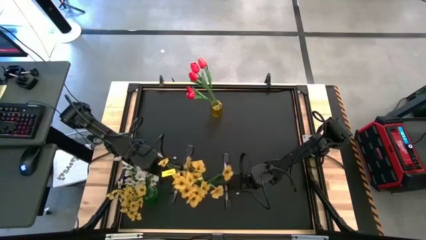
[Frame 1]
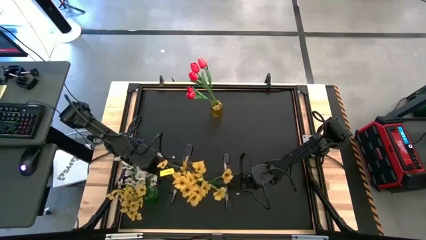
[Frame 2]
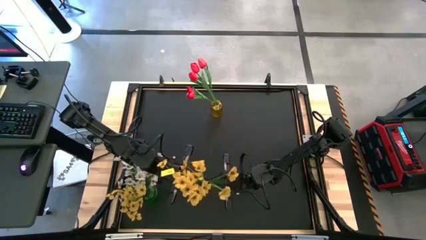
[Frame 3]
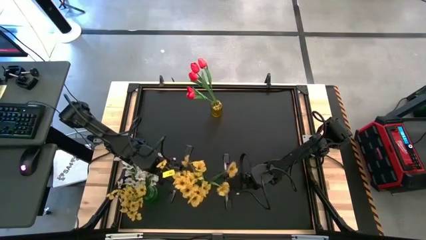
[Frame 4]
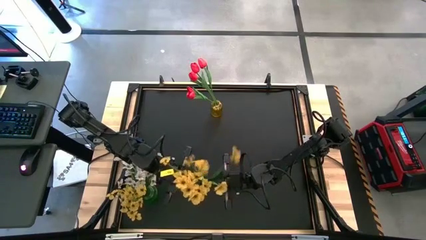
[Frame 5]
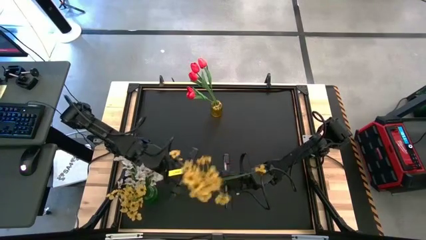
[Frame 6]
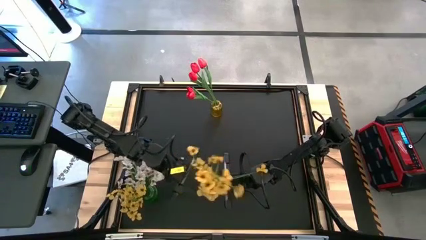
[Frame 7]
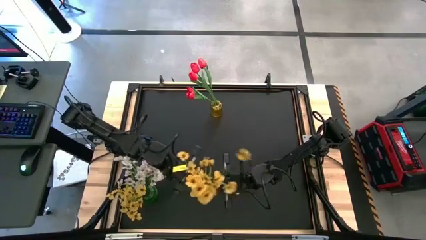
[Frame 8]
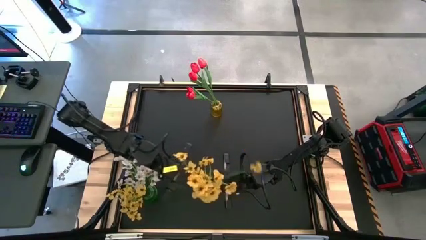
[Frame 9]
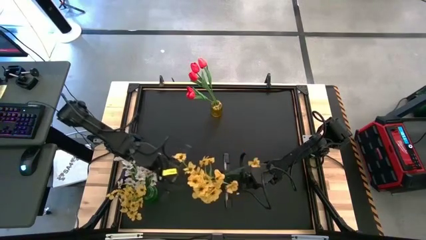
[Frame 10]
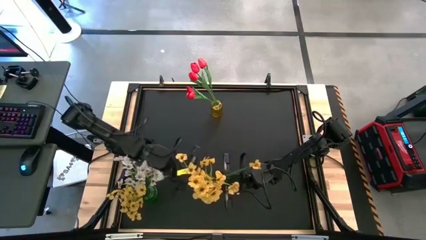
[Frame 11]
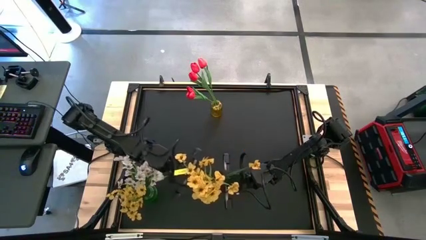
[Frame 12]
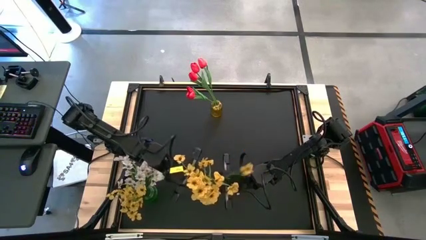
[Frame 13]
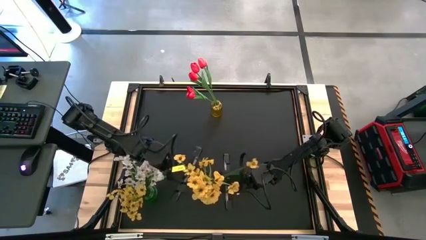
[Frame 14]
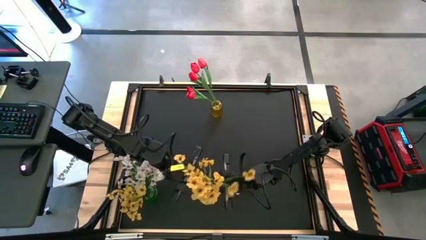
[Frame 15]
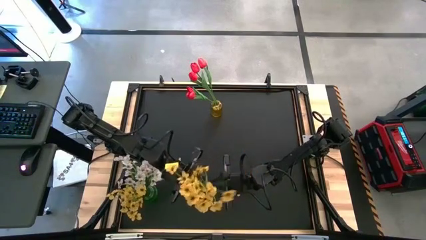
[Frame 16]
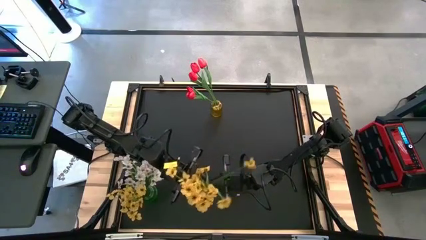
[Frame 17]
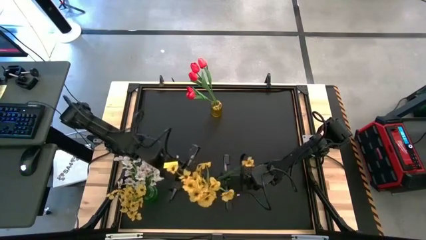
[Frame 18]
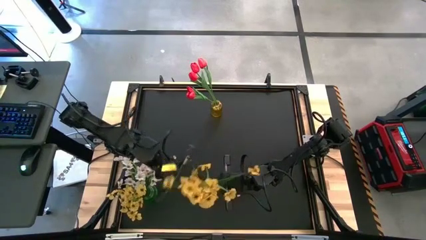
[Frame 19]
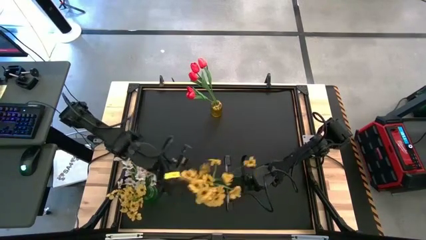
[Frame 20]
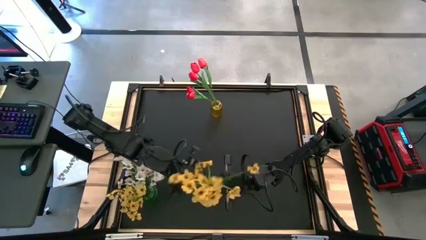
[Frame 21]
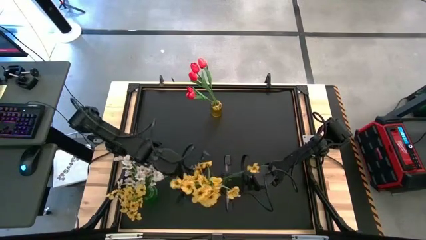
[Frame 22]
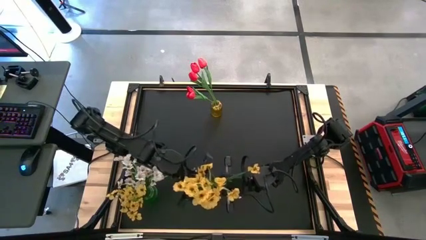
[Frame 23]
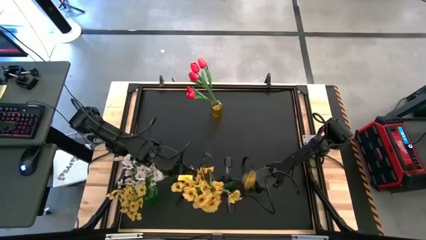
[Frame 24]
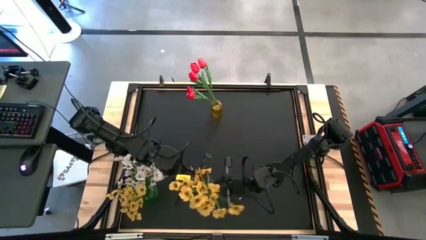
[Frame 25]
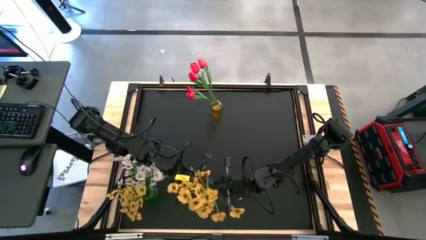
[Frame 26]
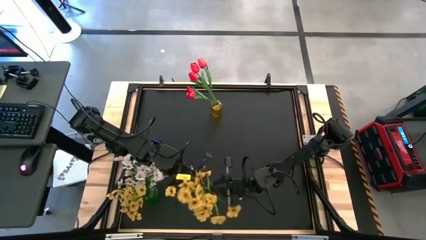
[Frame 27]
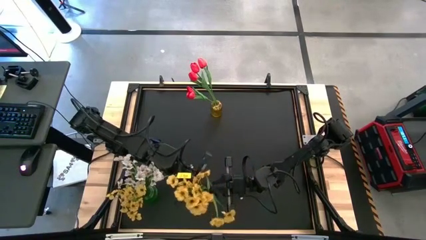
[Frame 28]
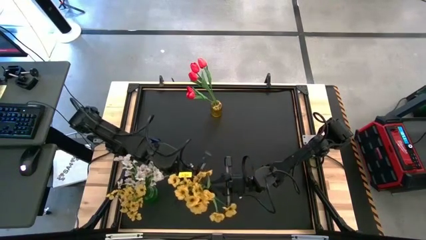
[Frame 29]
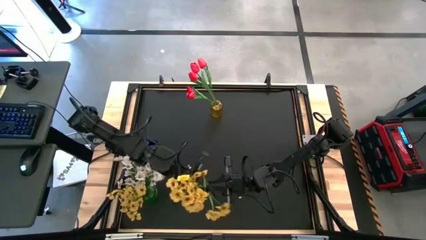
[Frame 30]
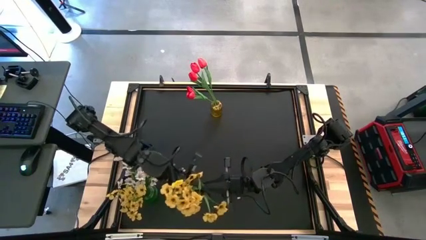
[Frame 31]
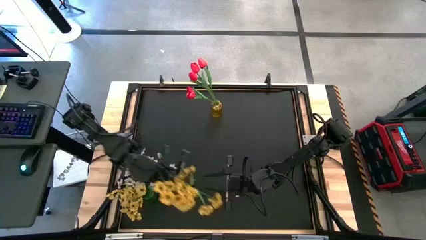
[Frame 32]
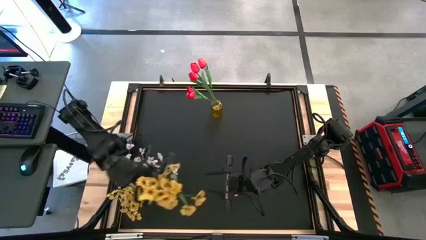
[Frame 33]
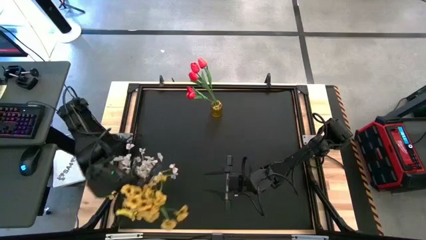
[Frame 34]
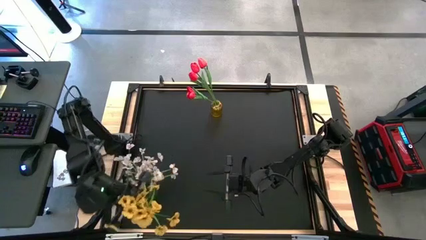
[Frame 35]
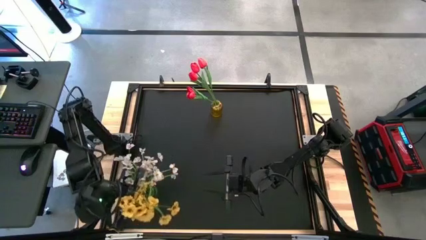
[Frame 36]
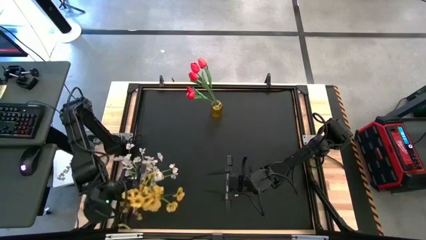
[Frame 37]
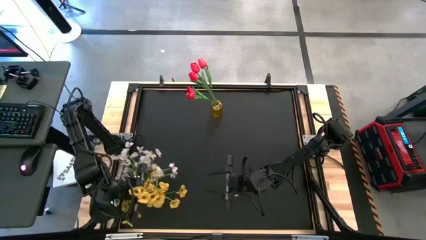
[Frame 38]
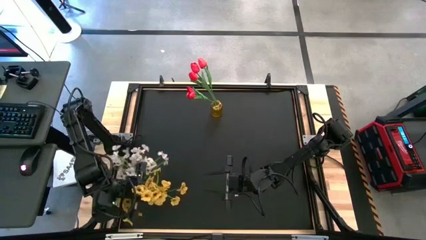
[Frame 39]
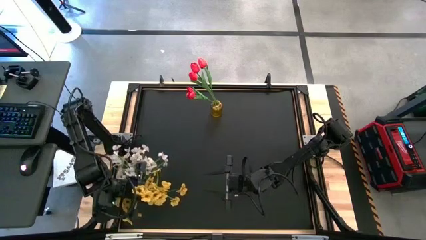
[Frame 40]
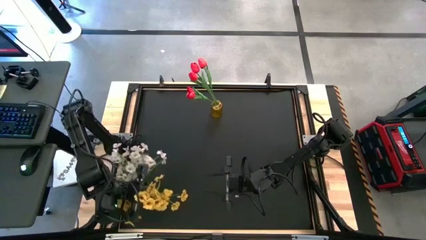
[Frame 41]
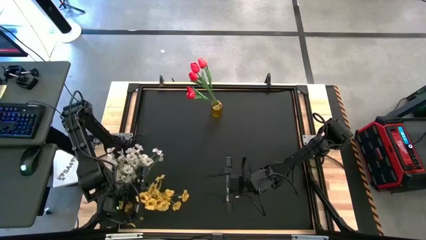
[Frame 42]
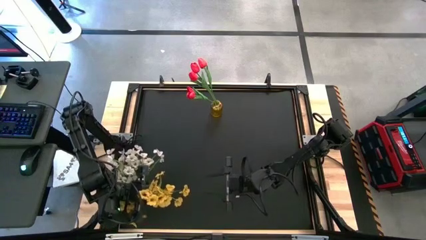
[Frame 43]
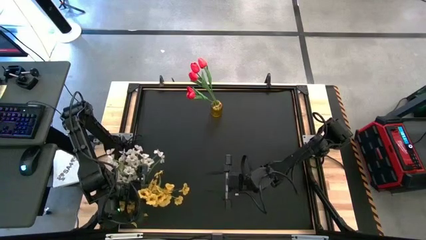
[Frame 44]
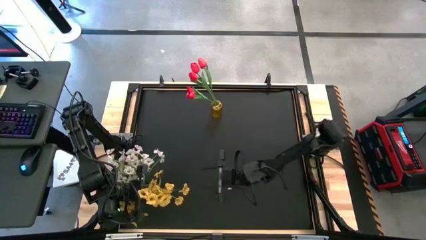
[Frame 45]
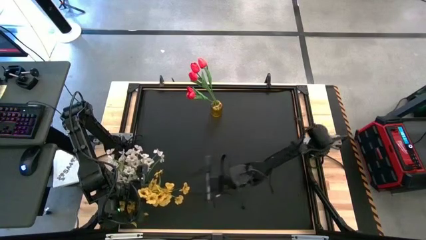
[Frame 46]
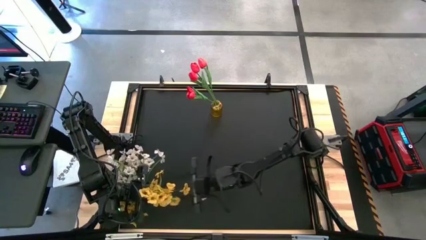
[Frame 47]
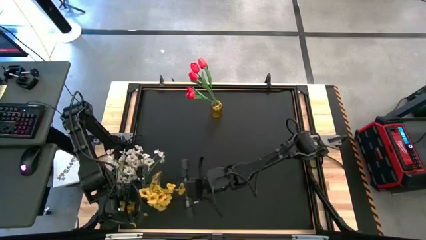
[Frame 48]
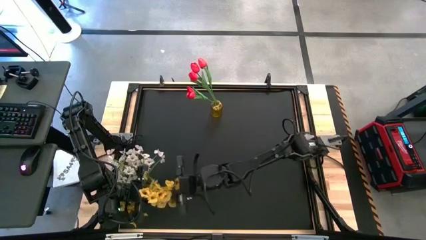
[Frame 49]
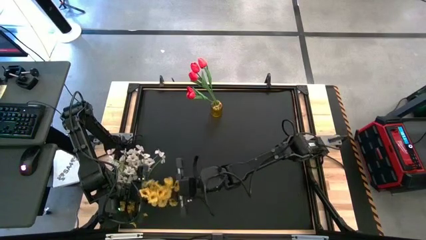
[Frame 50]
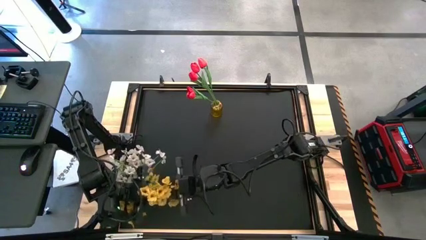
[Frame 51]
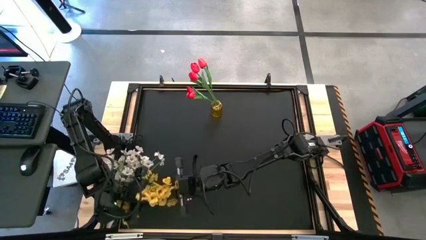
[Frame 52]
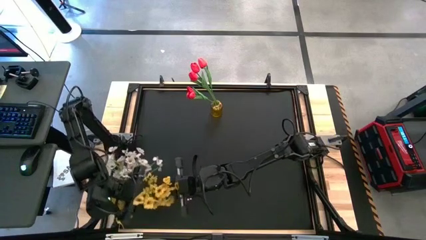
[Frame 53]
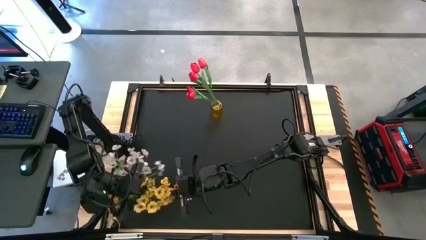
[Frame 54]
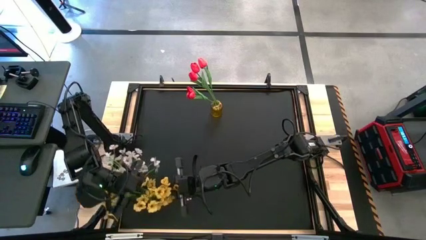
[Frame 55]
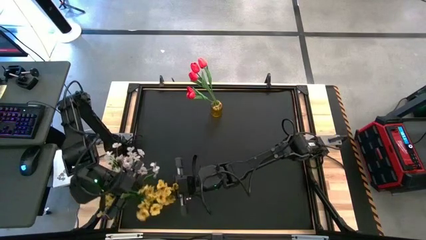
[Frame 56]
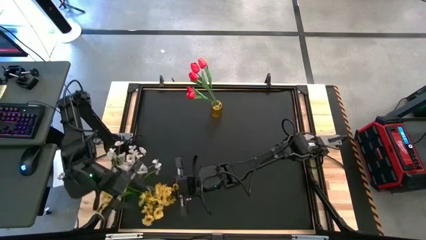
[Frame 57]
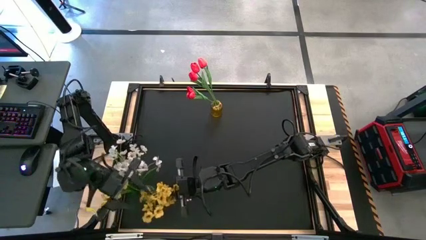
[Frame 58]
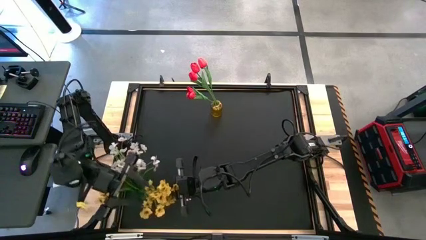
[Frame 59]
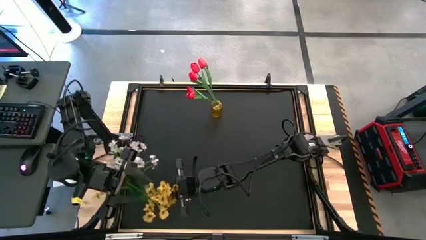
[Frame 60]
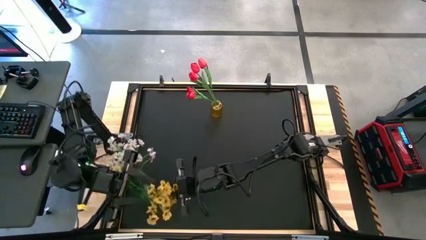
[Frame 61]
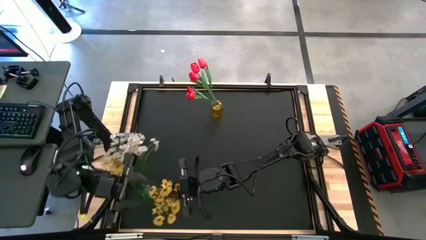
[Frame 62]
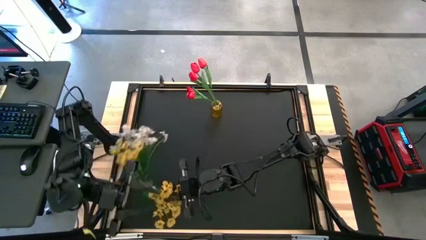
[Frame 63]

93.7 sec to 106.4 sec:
Task: Sort flowers into vase by color
Put the yellow flowers into the green vase

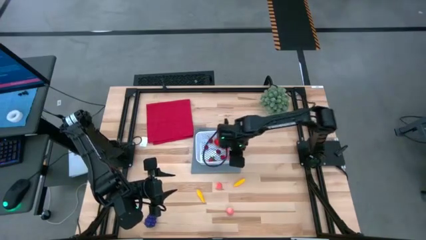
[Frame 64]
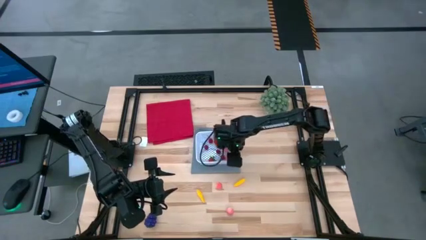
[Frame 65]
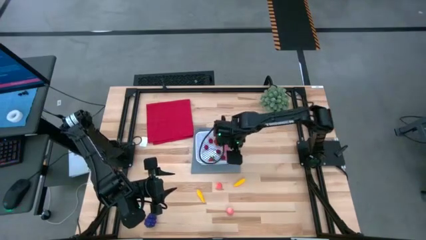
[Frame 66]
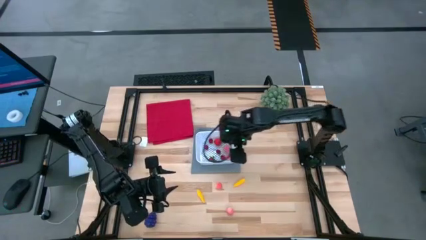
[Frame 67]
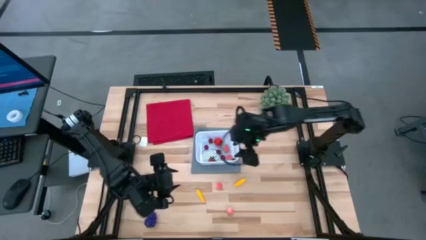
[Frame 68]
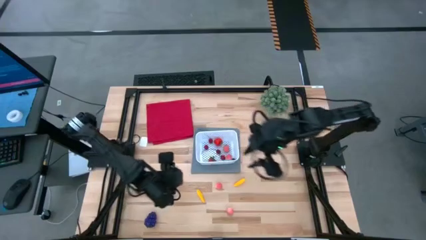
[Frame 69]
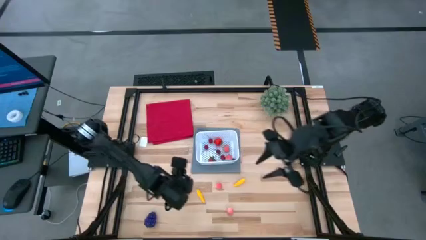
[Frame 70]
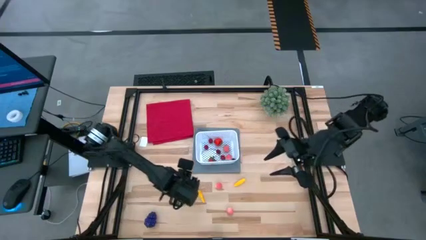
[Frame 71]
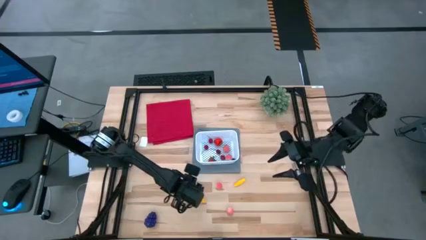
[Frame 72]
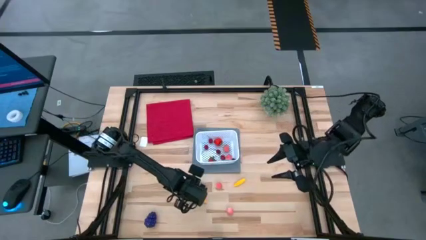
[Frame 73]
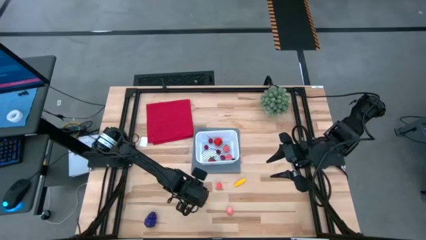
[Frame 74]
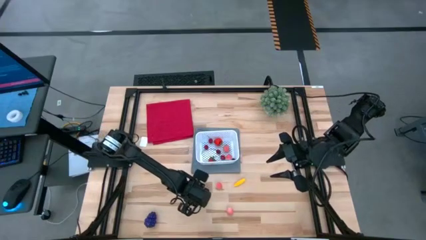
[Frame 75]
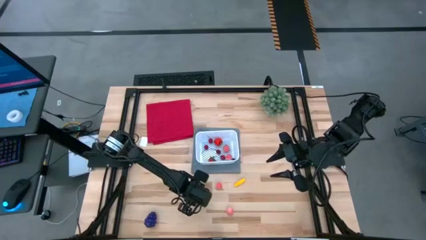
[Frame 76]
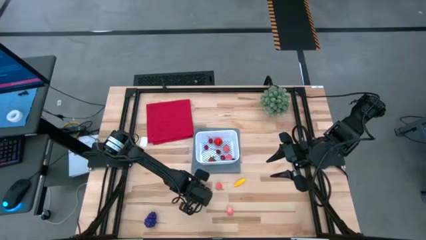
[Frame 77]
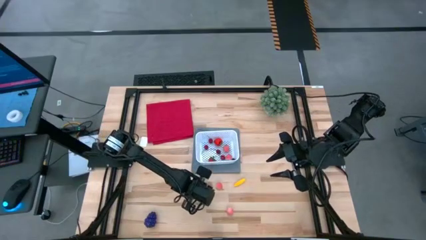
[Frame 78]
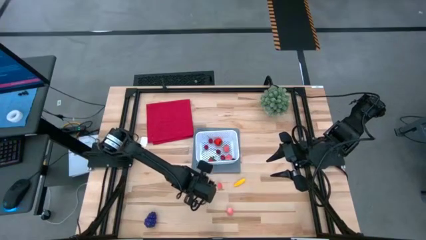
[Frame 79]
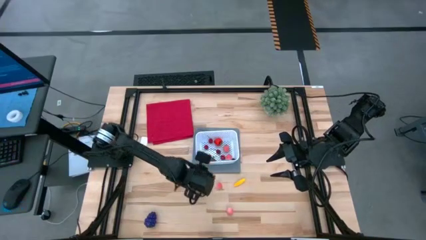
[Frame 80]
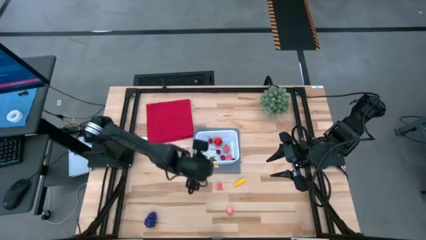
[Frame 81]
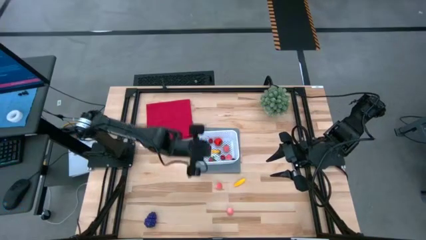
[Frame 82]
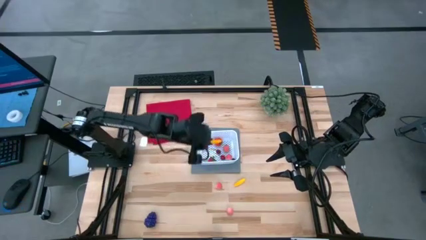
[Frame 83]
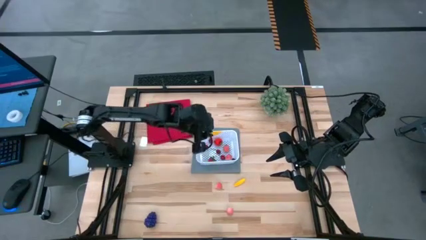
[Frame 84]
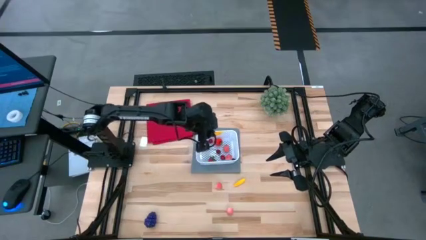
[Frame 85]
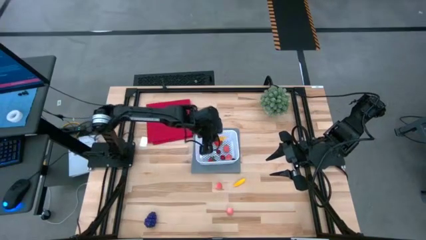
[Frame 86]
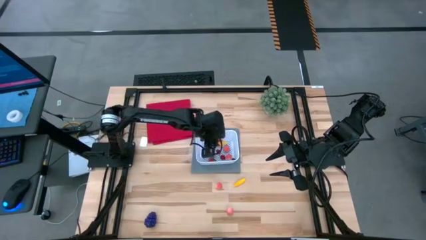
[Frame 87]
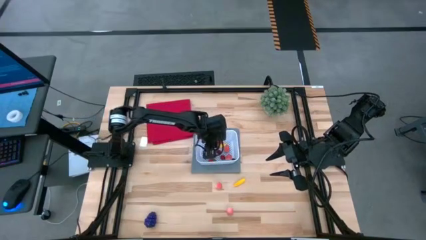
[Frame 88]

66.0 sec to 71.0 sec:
Task: Pick and placing Produce into tupperware
Put the left corn into the white basket
